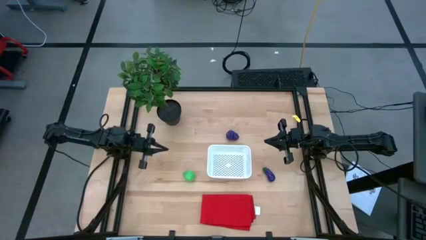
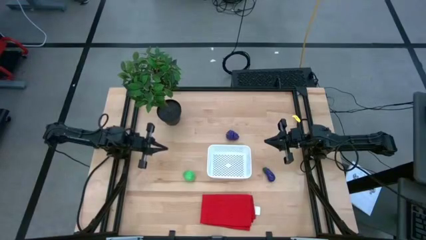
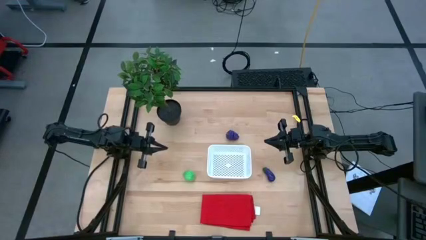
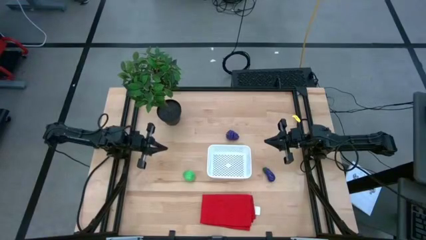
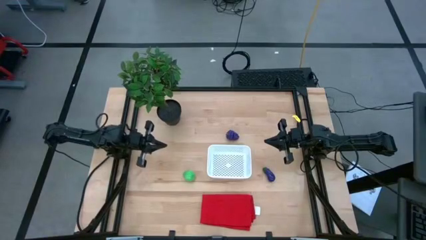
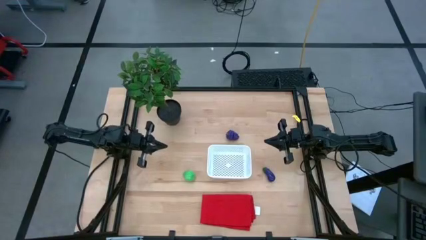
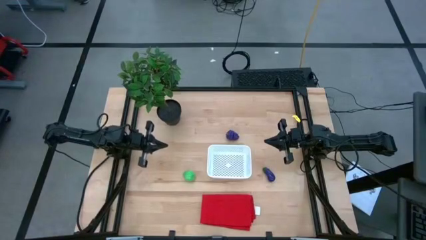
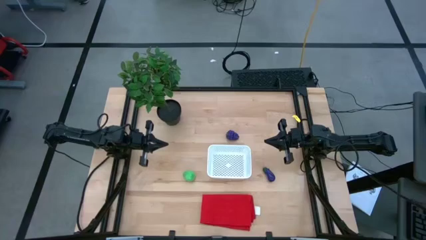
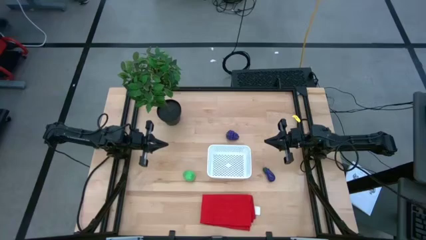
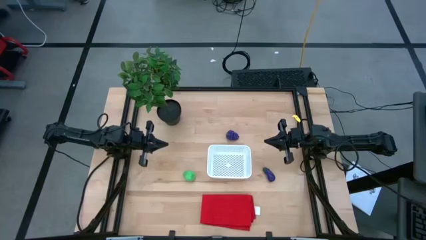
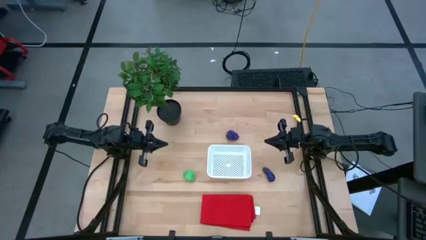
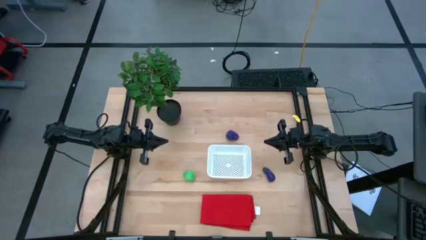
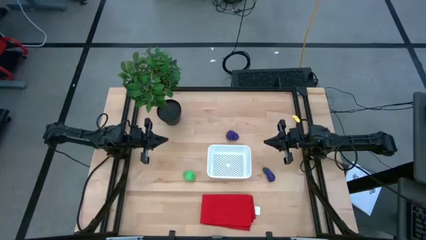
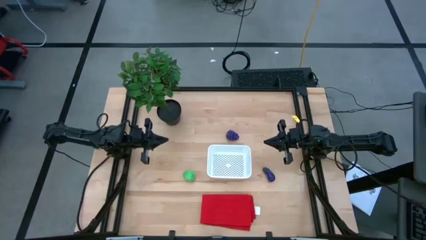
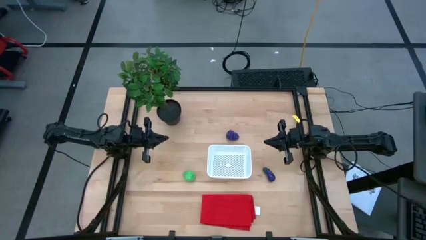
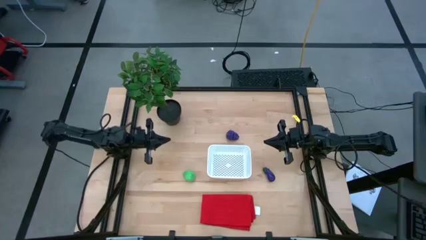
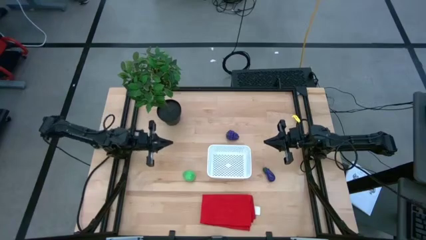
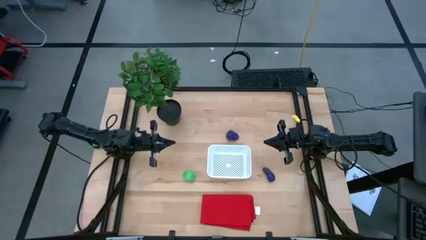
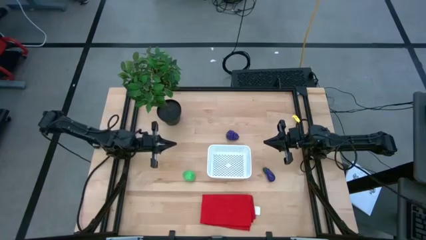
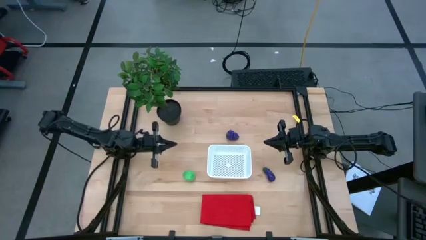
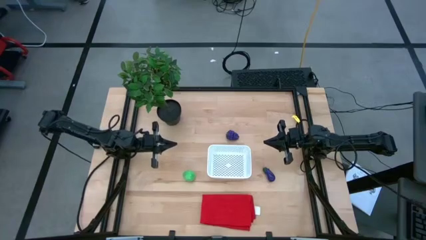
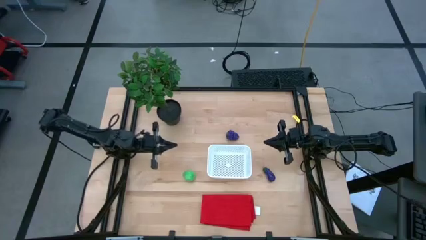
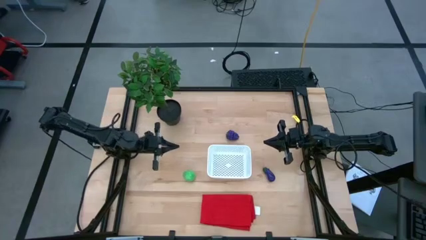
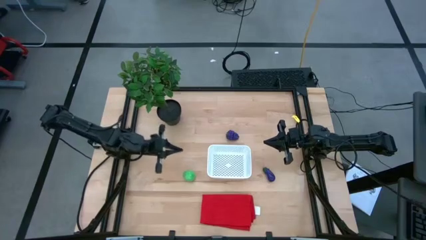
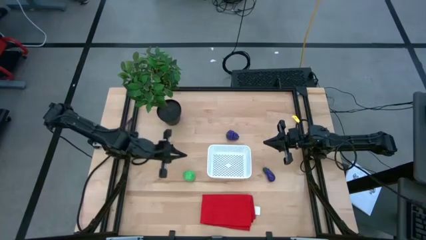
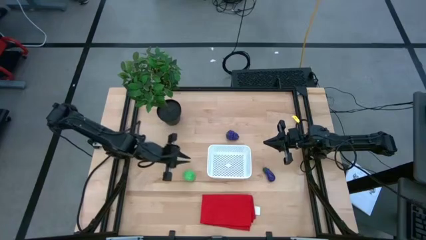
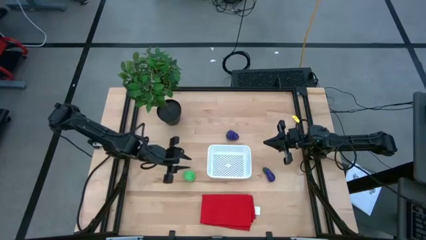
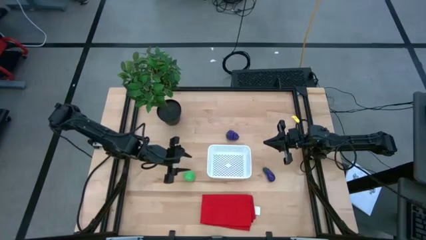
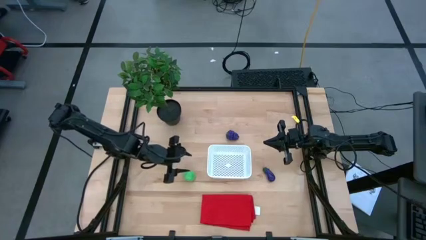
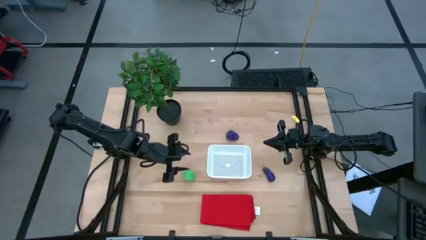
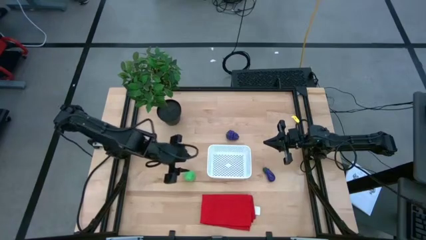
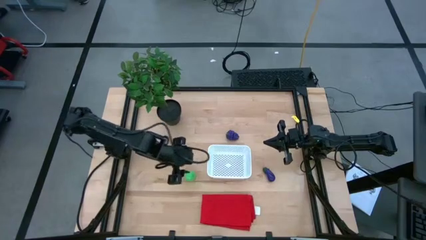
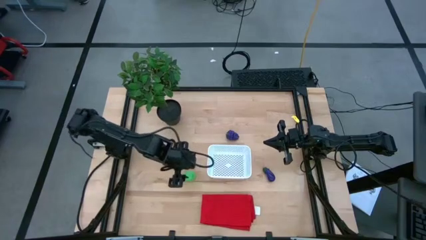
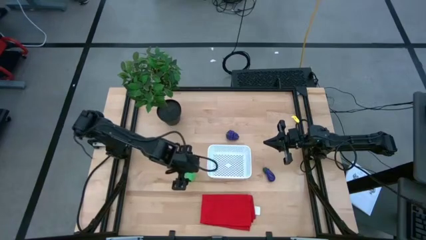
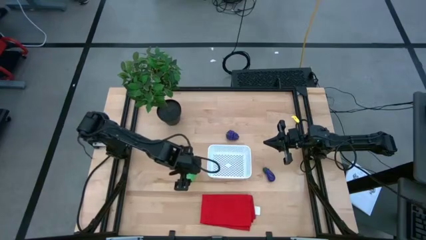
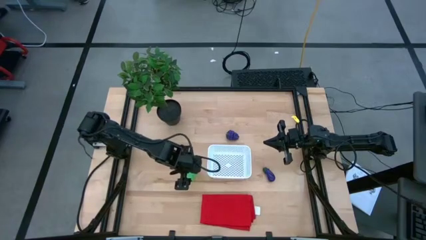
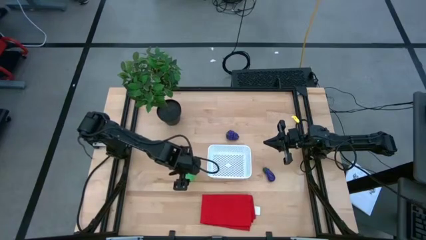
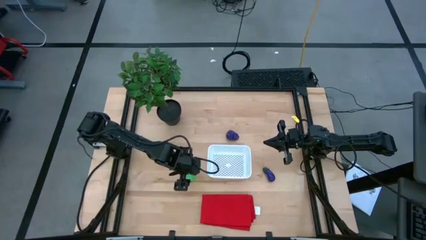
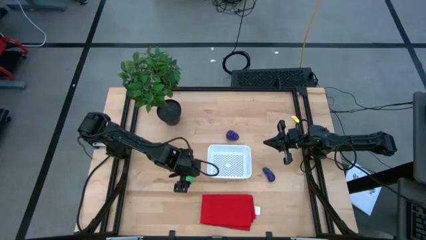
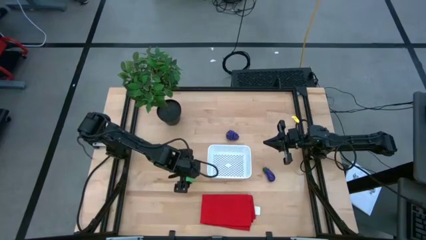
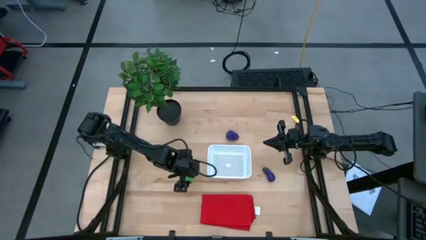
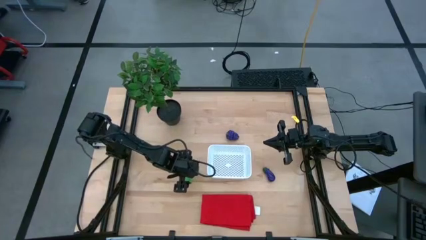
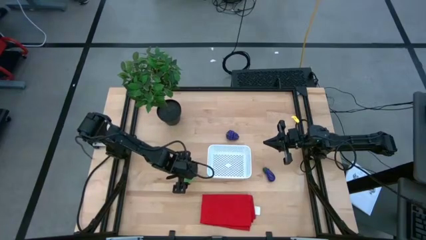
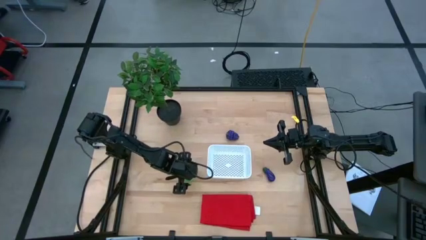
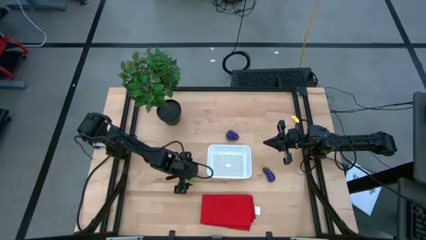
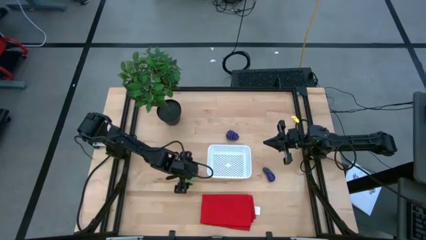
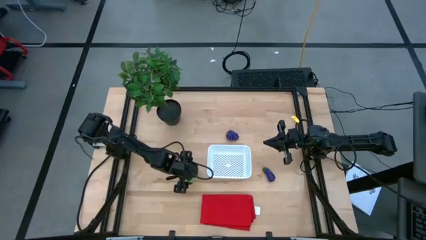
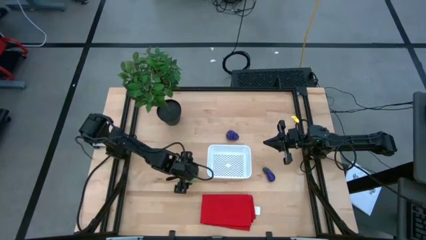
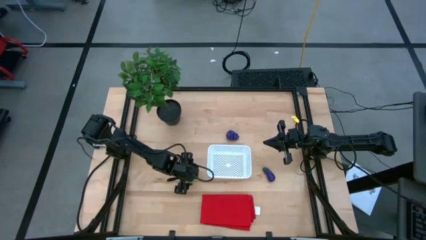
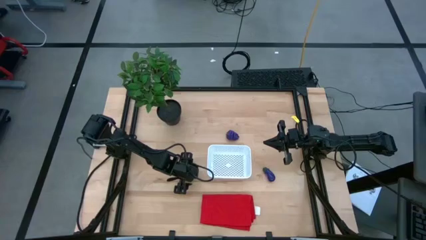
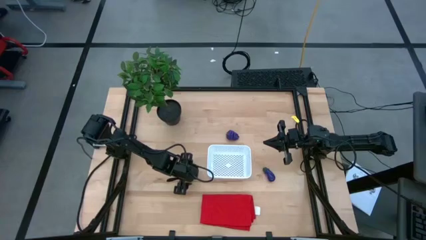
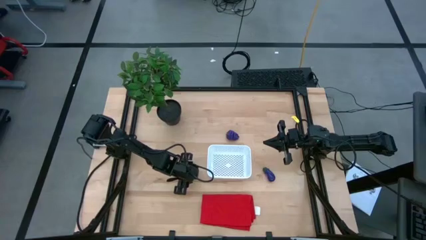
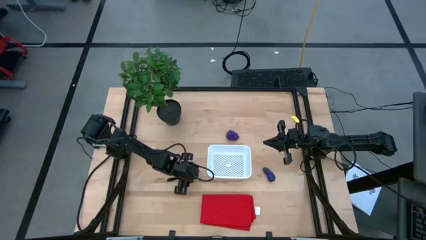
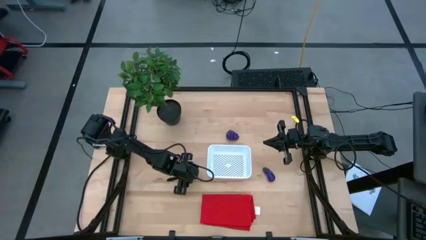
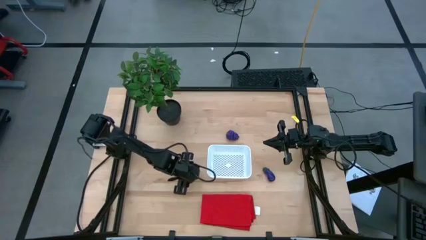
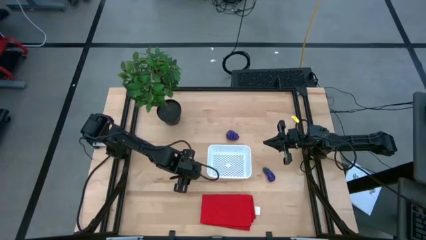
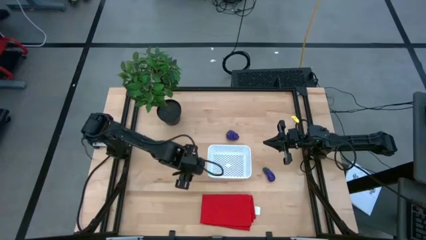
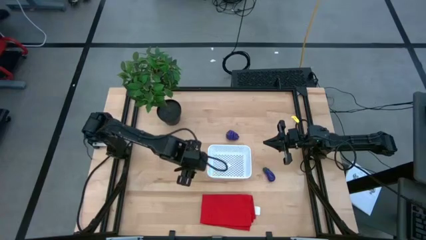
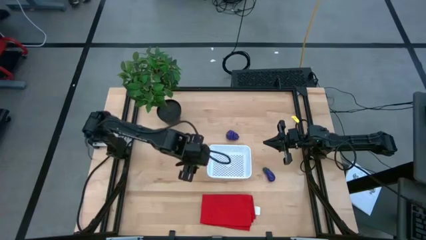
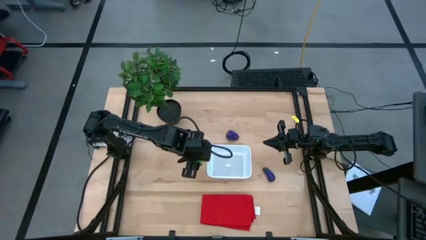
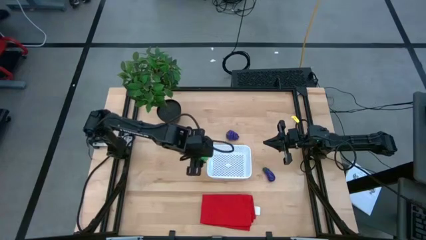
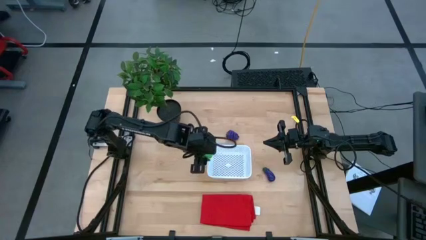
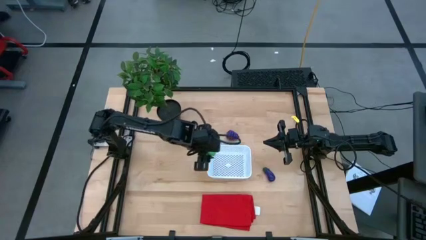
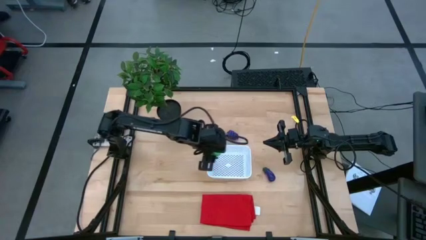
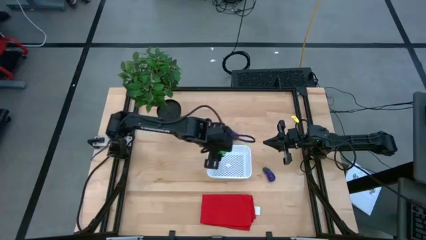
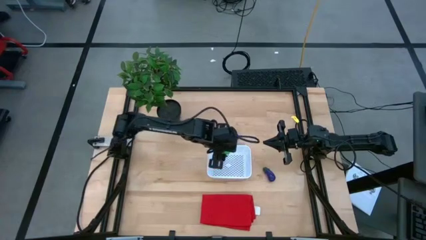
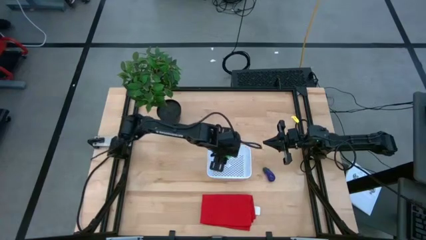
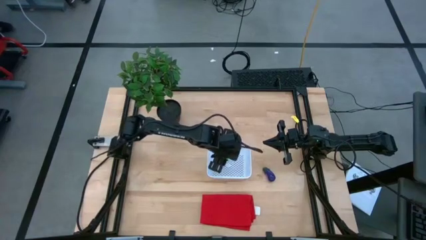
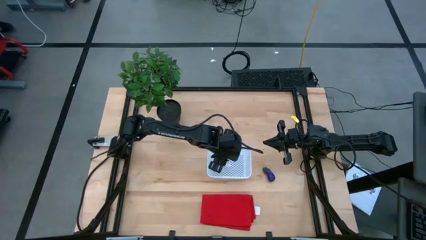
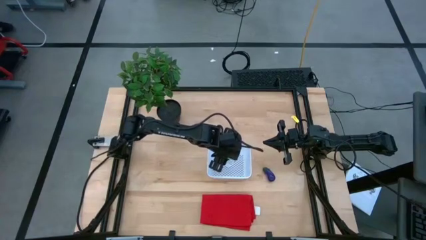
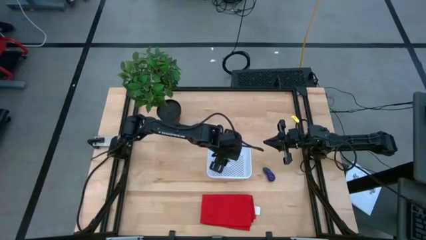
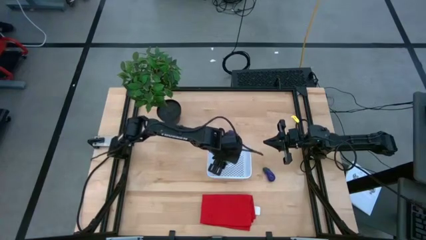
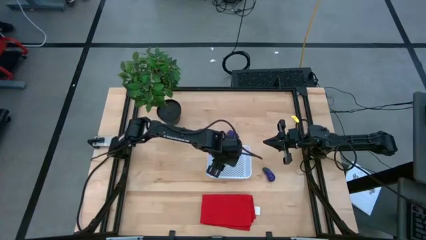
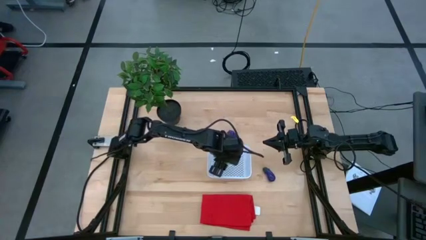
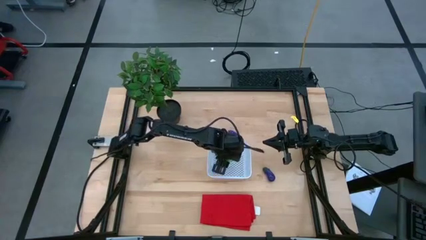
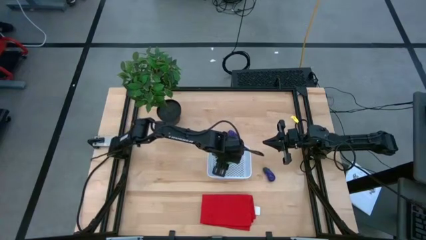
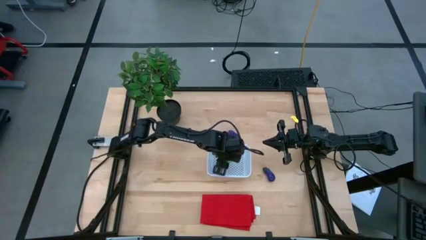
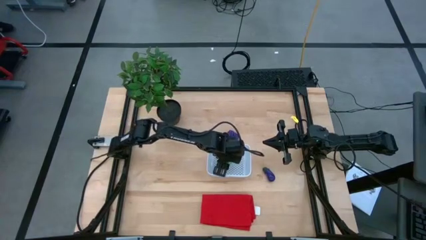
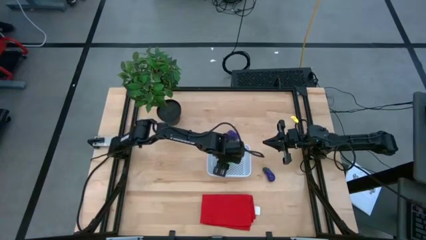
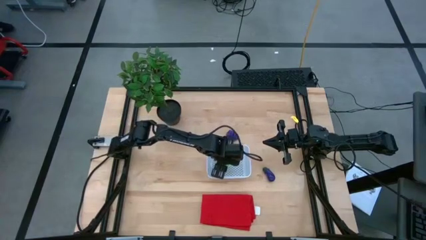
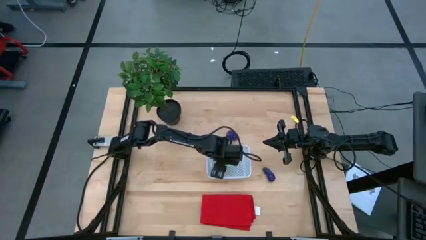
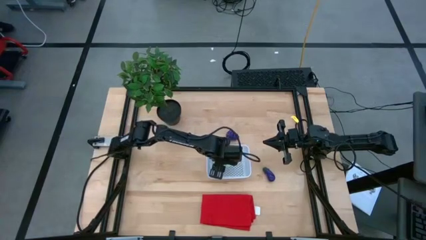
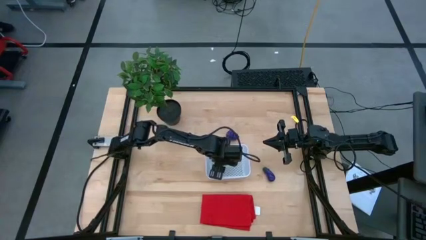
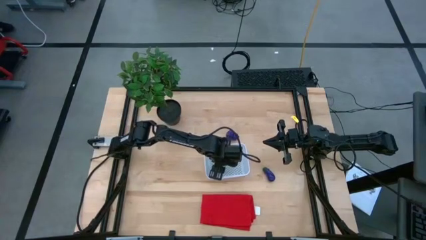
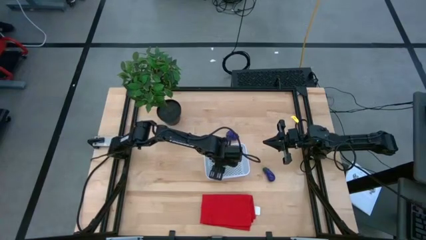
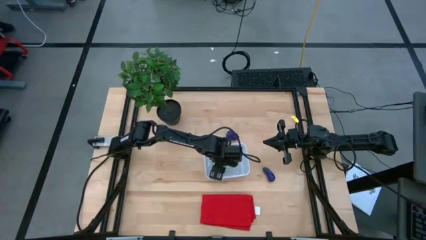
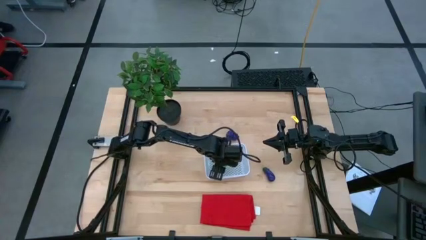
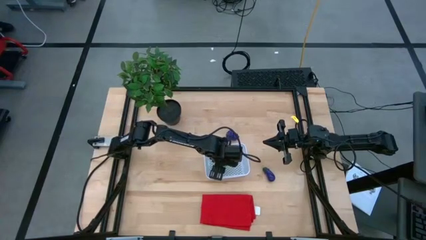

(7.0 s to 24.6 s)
Task: Pick and placing Produce into tupperware
Put the green guava into the white bin
